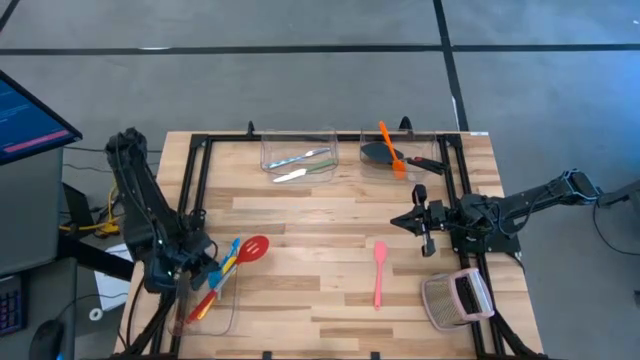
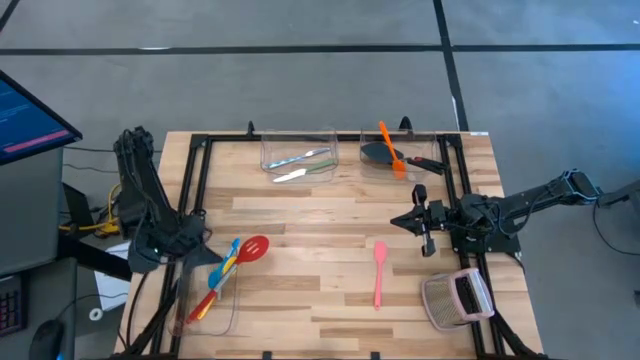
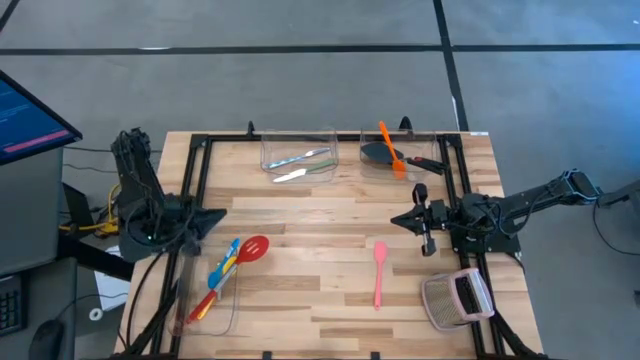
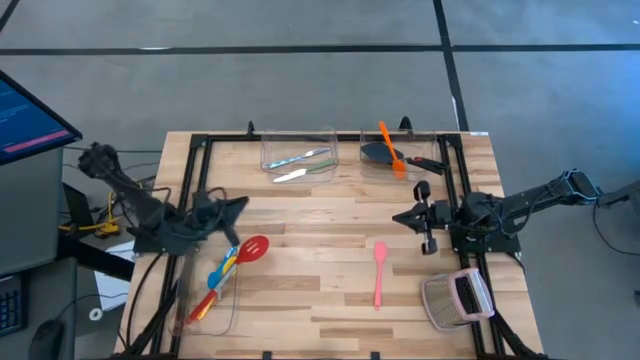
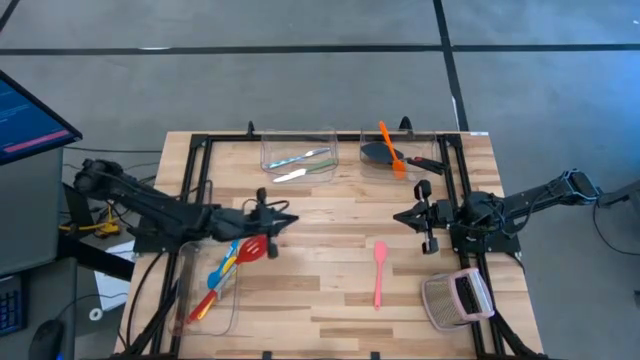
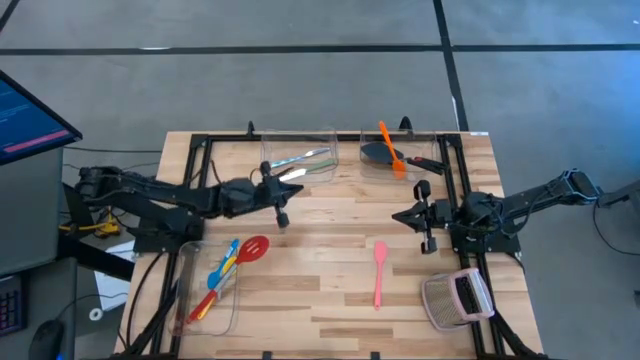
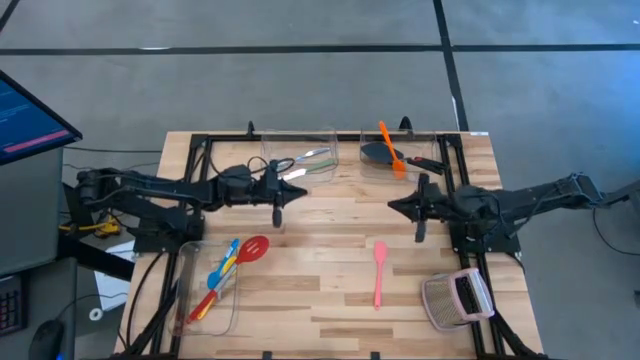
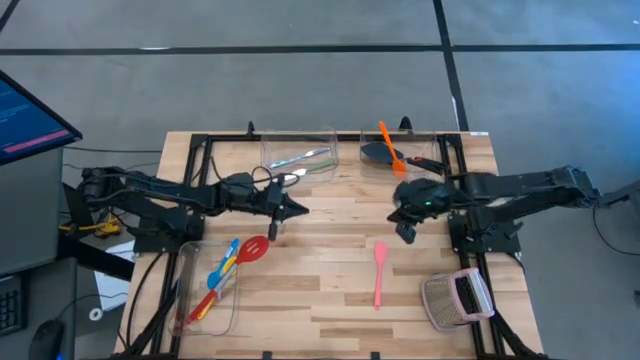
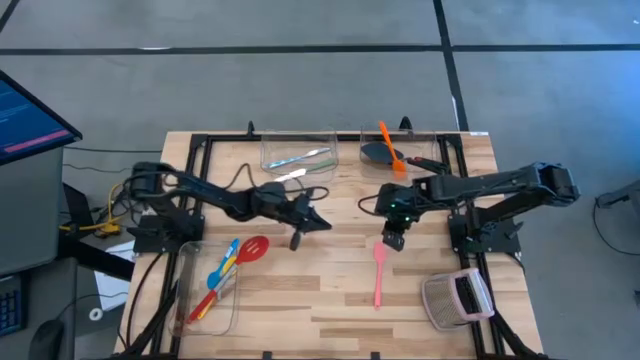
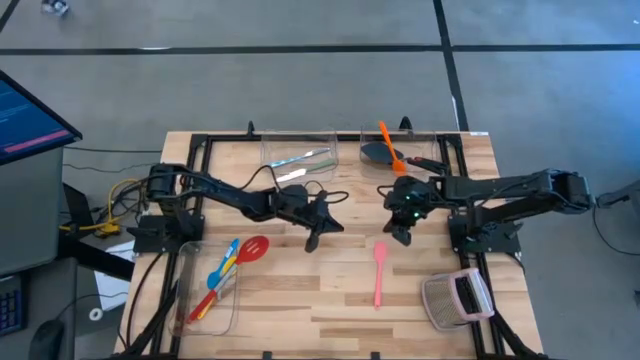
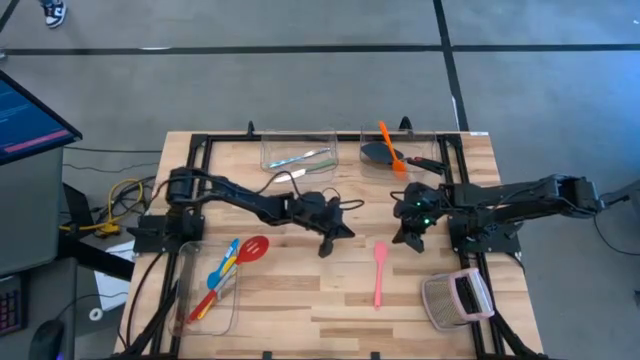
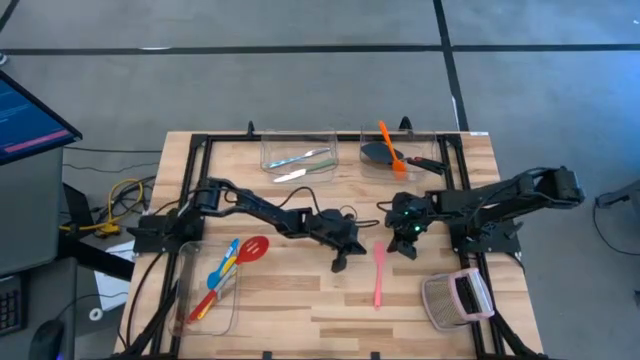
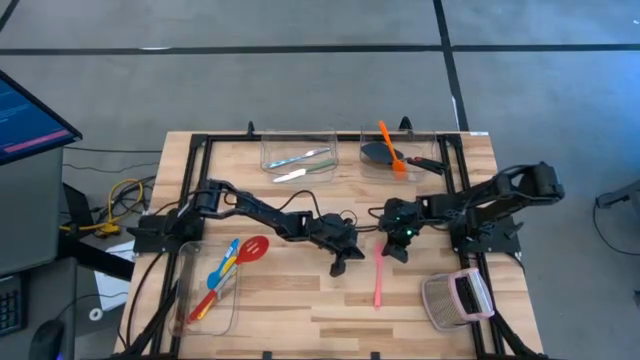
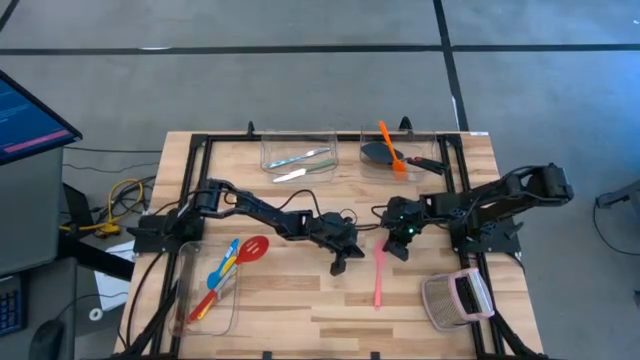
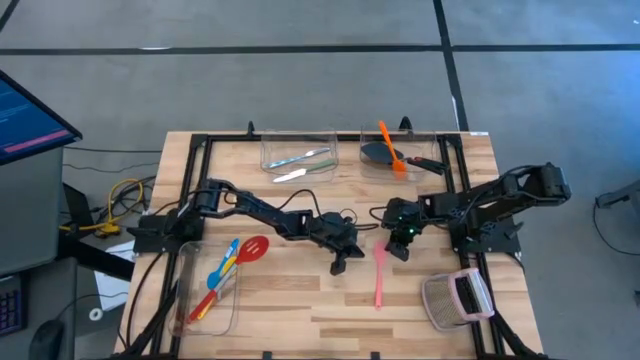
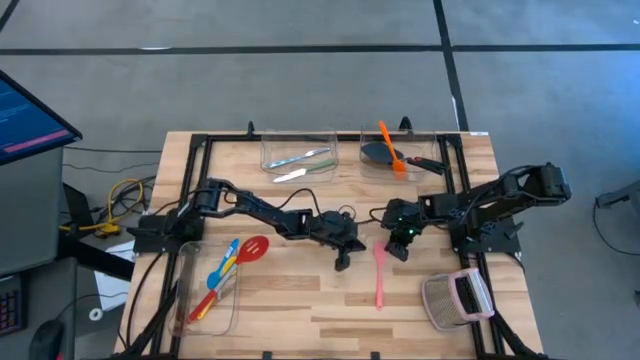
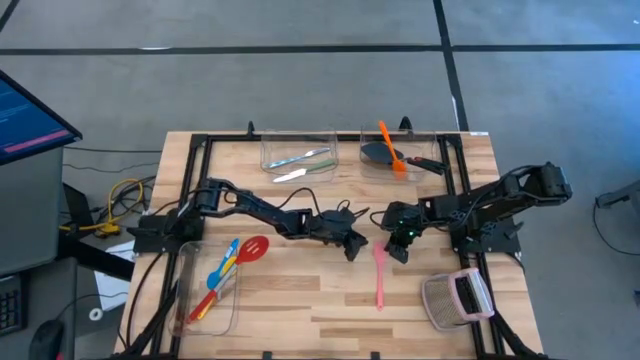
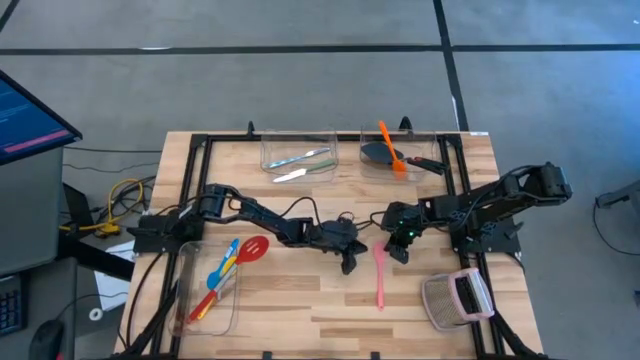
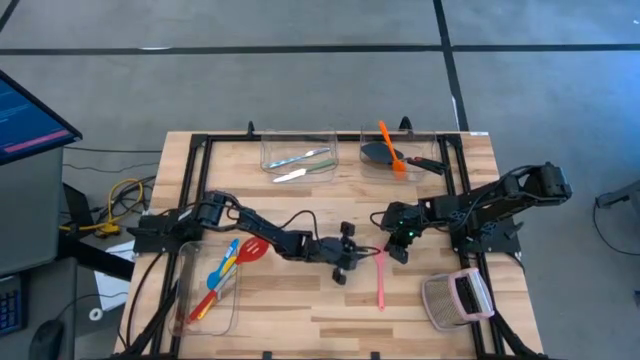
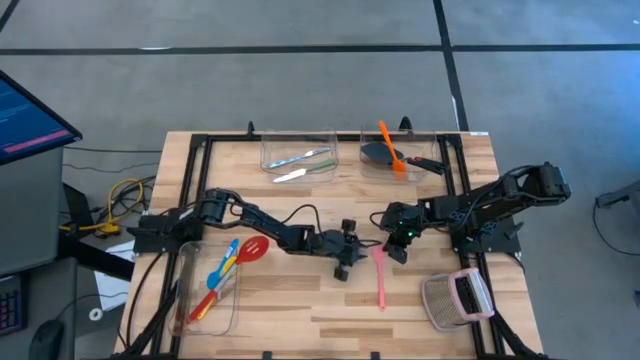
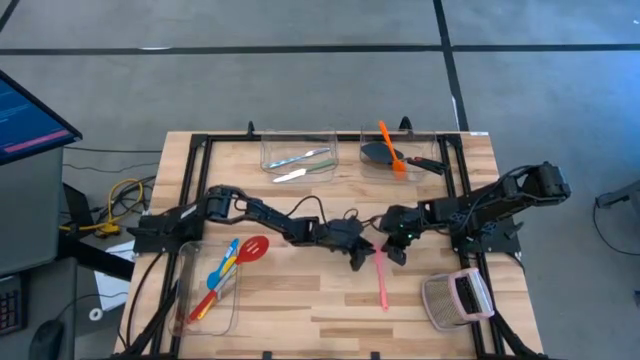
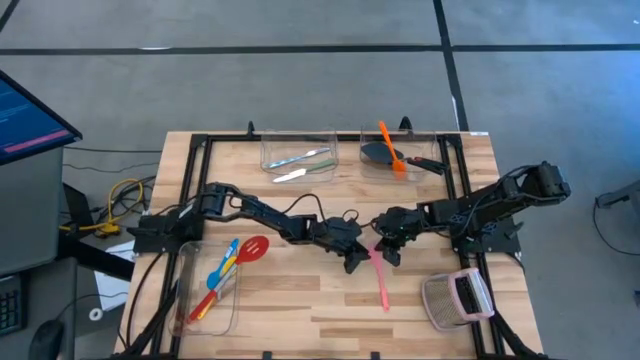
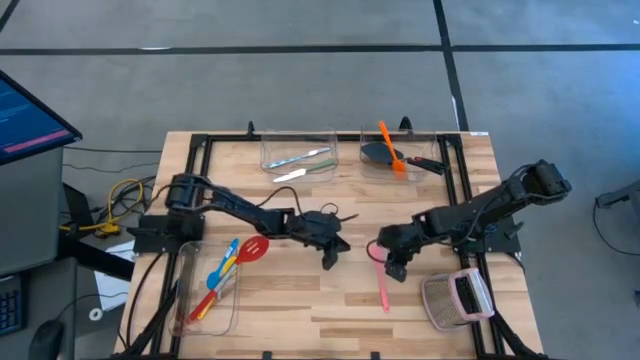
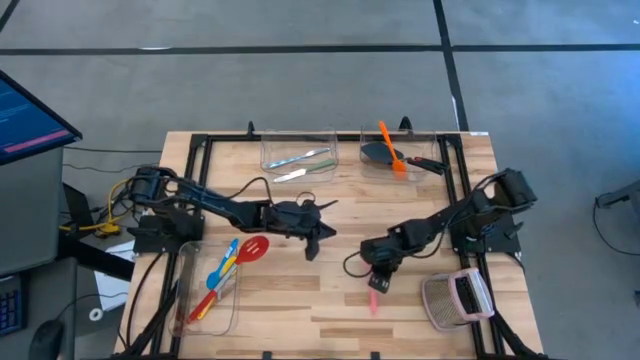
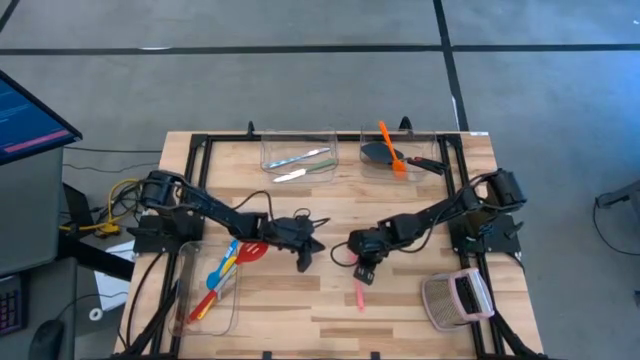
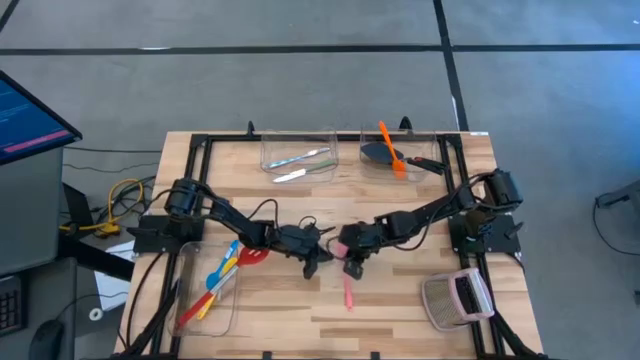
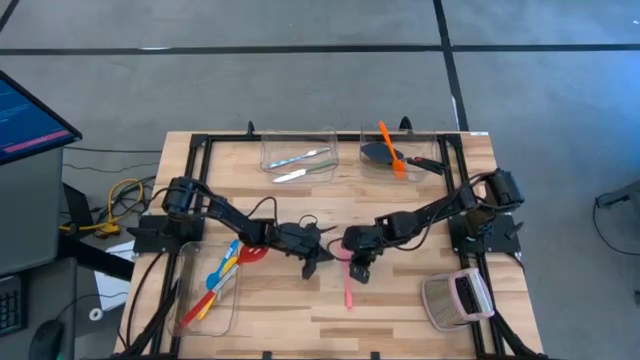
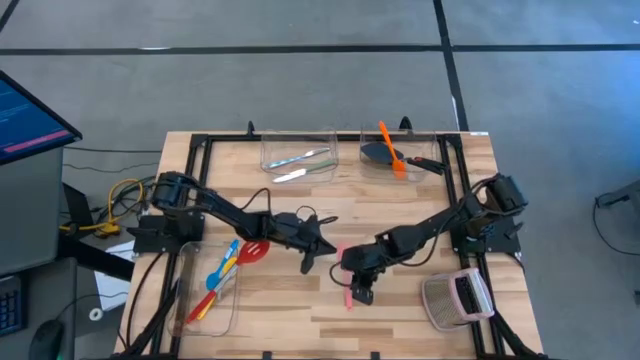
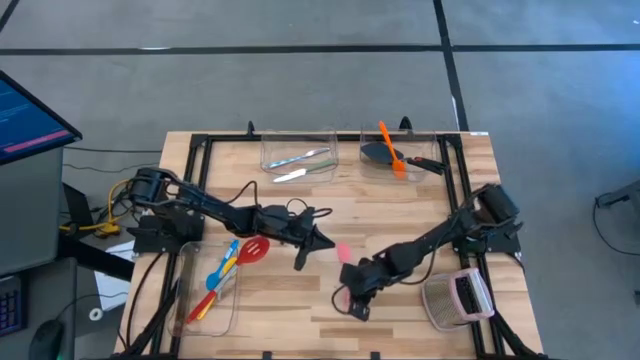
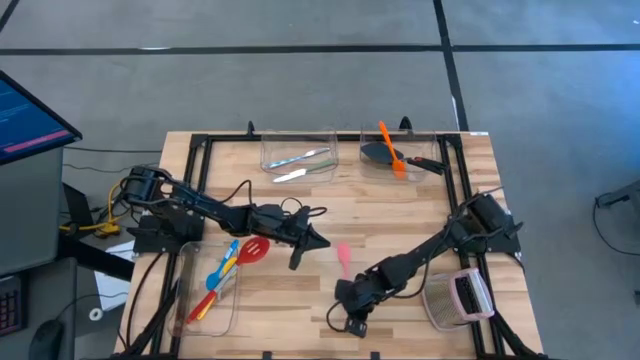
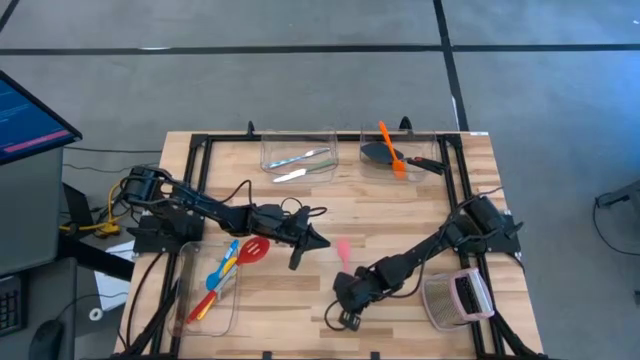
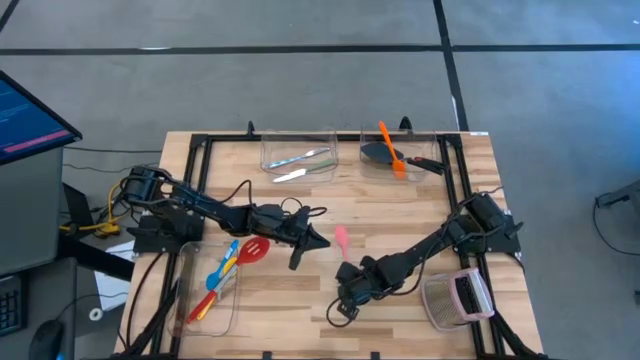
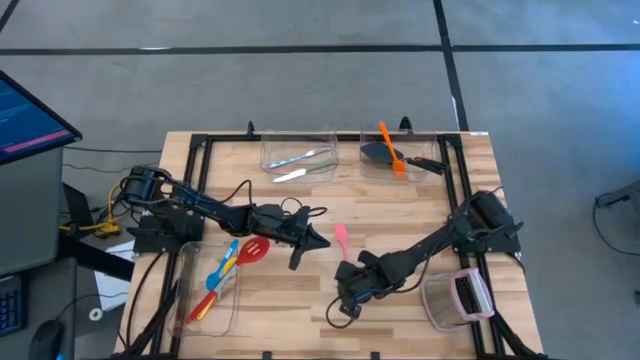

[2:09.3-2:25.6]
Task: Pick & Place Kitchen Items
Put the pink spatula into the top right transparent bin

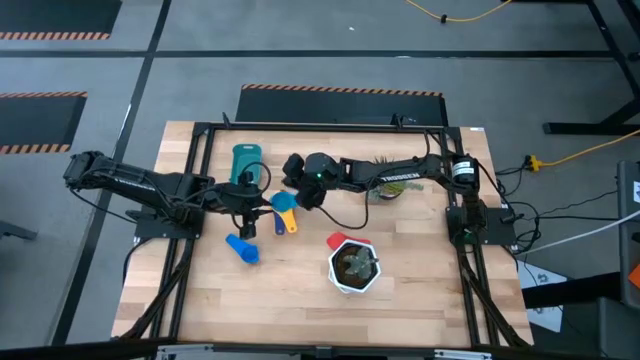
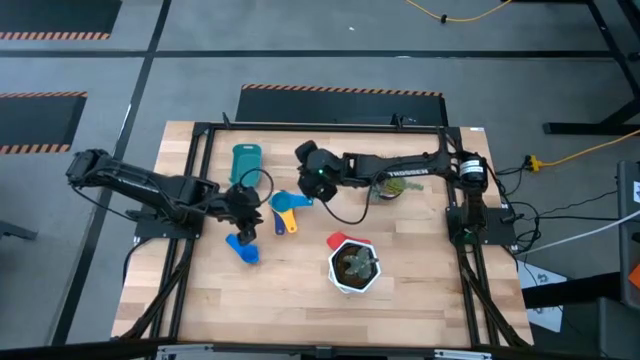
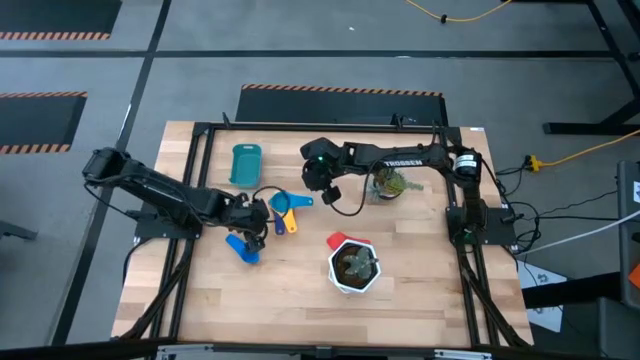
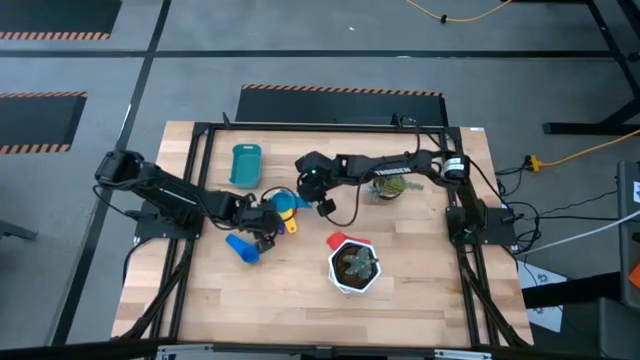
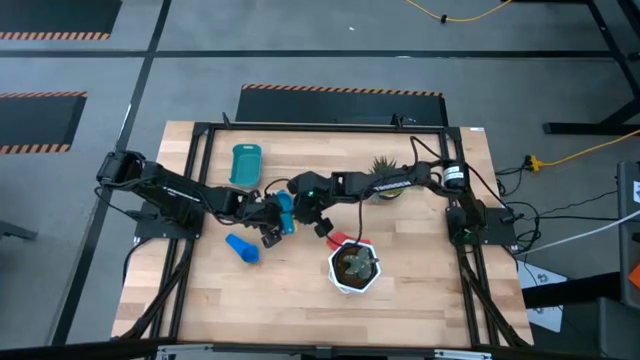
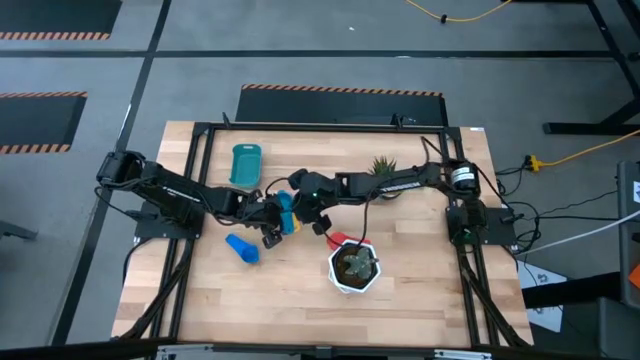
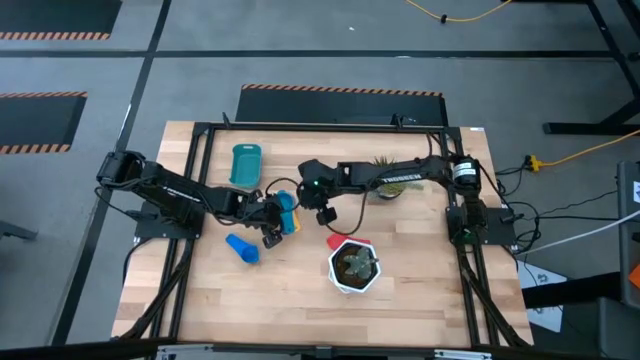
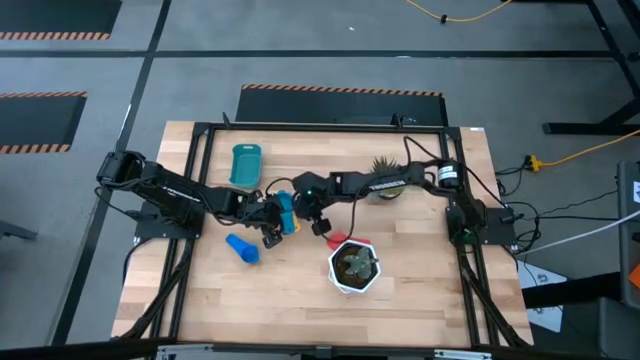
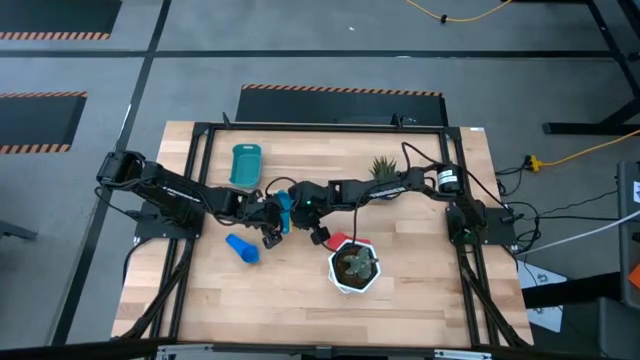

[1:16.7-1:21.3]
Task: Nest measuring cups in basket
Adjust the nested measuring cups to an aligned position
